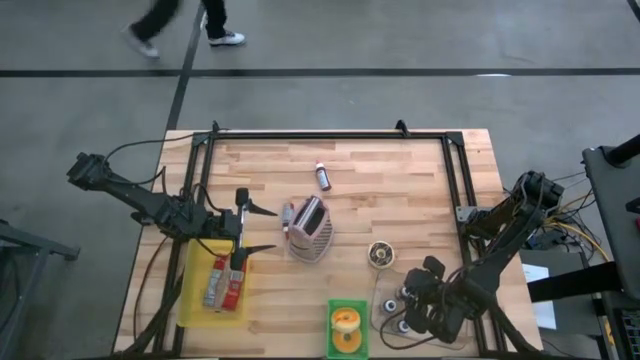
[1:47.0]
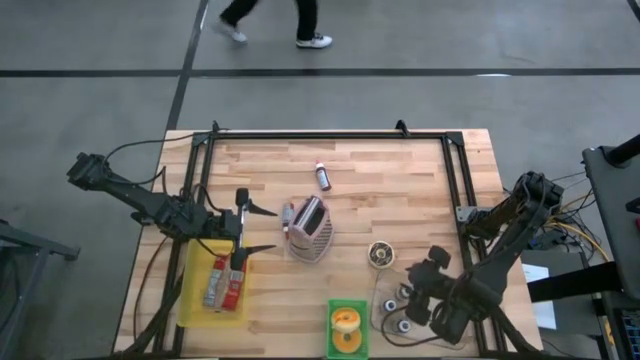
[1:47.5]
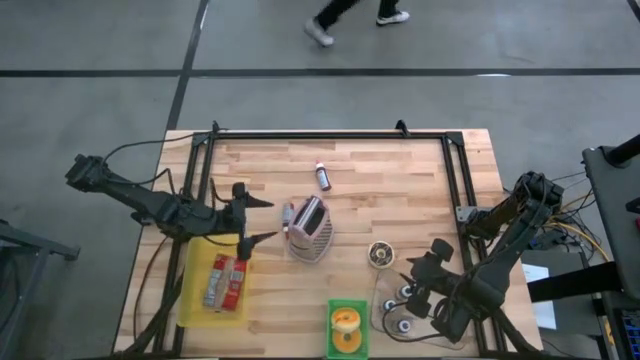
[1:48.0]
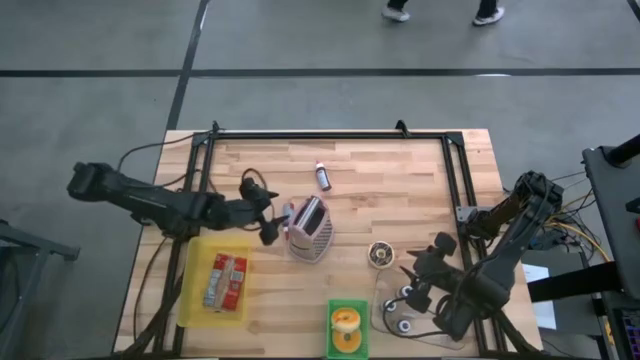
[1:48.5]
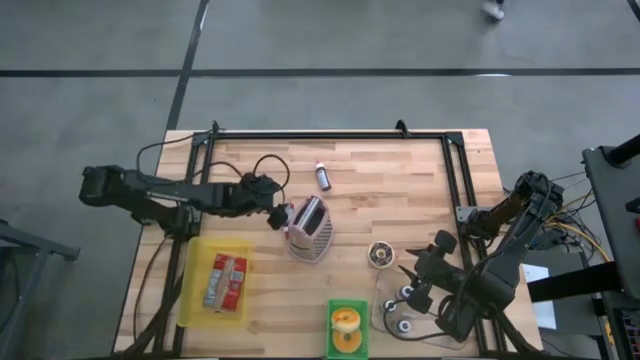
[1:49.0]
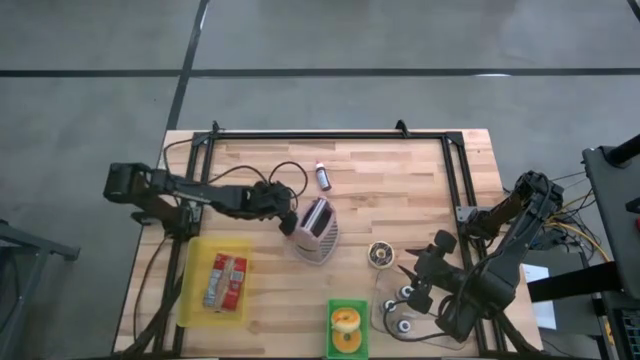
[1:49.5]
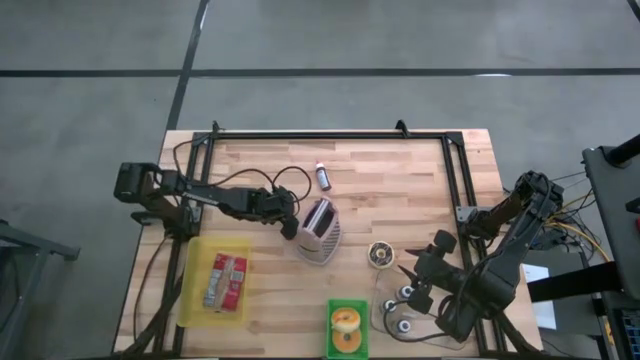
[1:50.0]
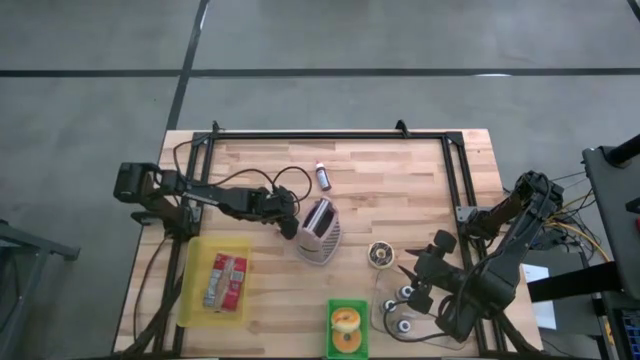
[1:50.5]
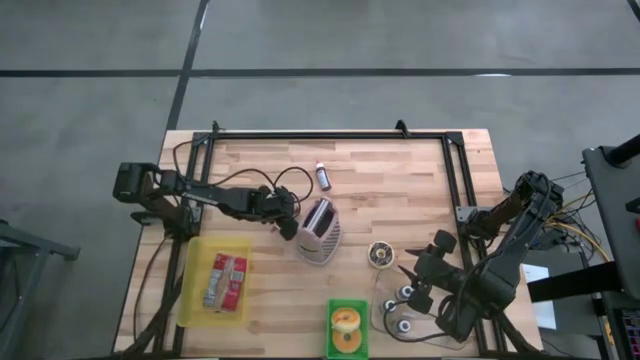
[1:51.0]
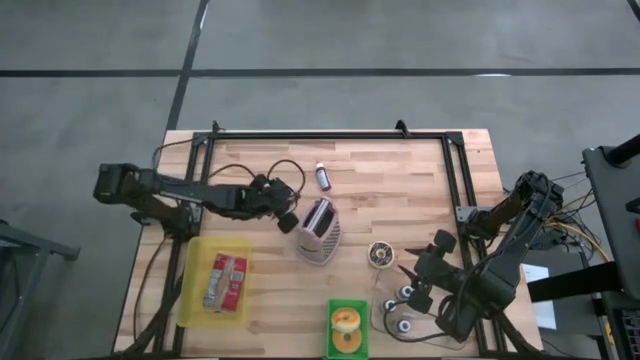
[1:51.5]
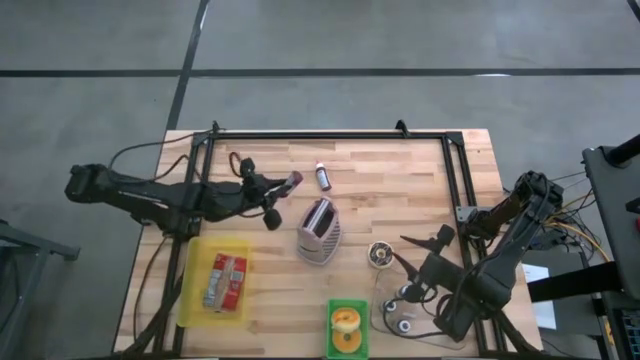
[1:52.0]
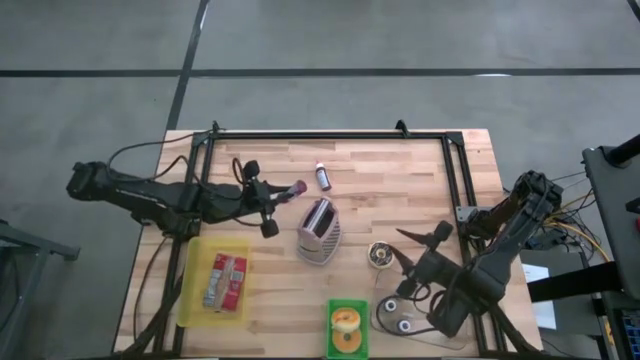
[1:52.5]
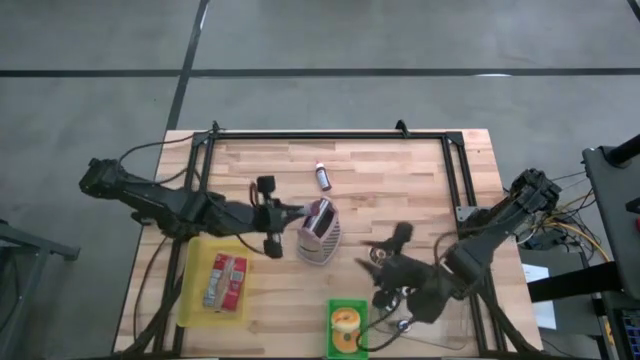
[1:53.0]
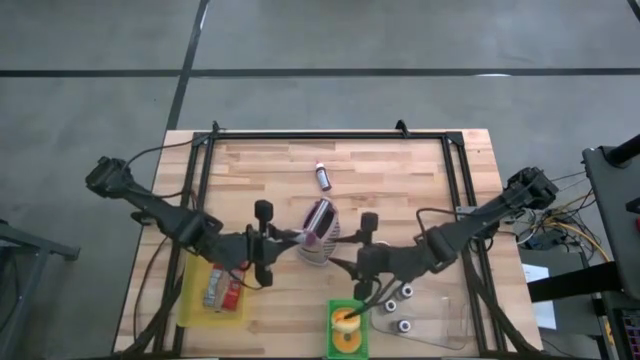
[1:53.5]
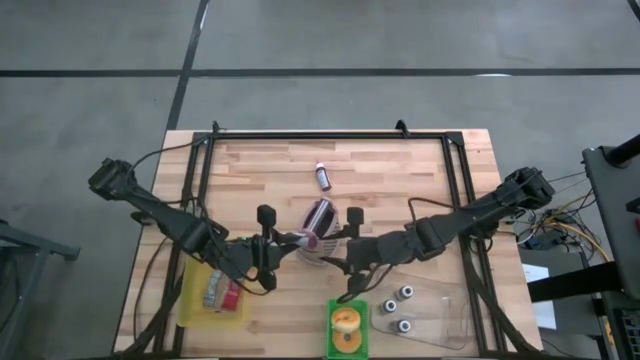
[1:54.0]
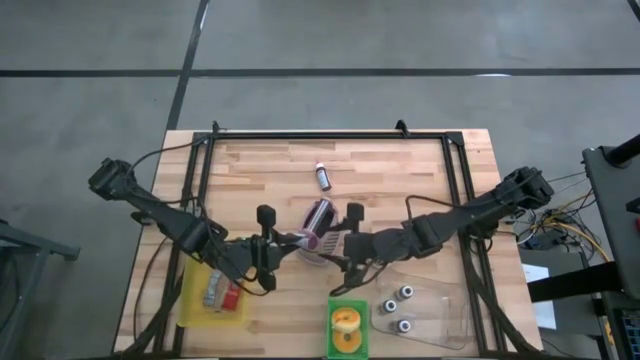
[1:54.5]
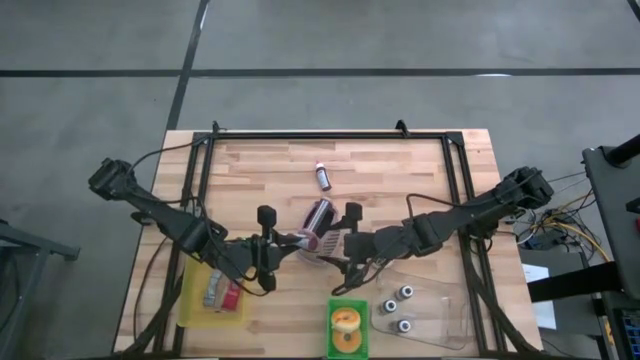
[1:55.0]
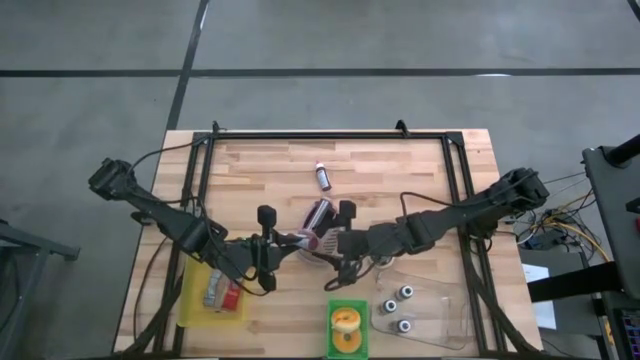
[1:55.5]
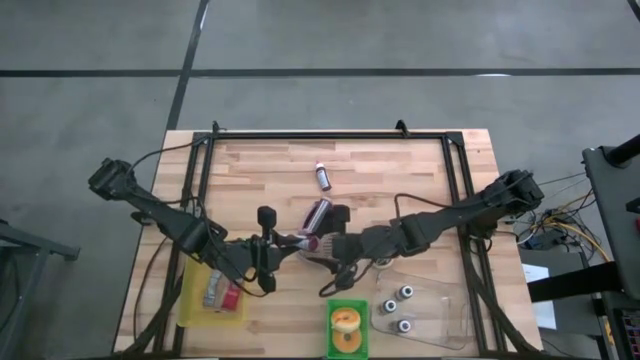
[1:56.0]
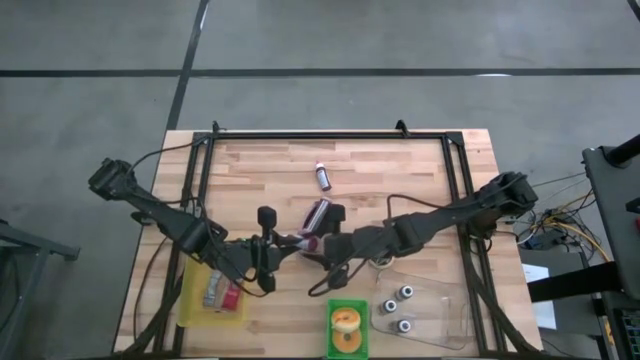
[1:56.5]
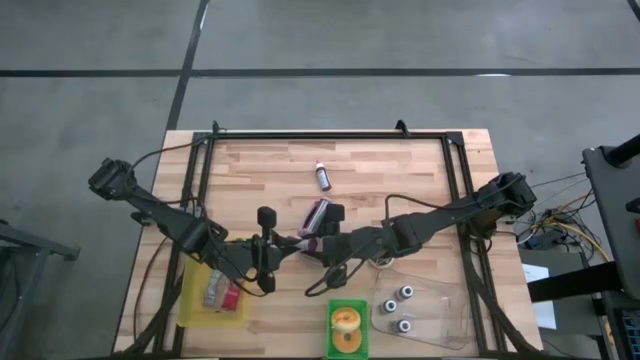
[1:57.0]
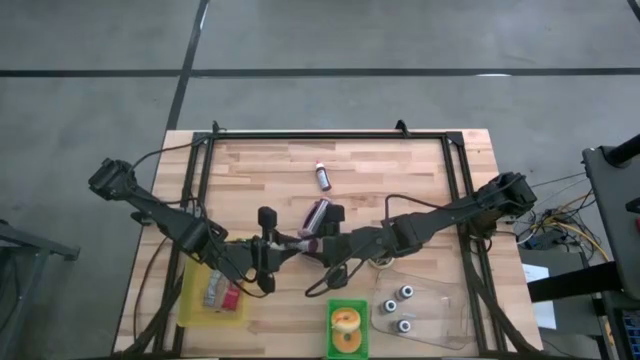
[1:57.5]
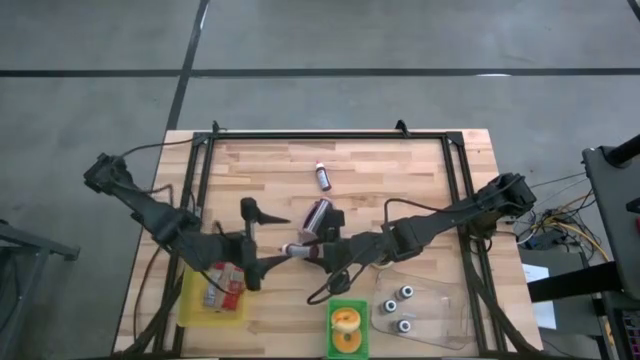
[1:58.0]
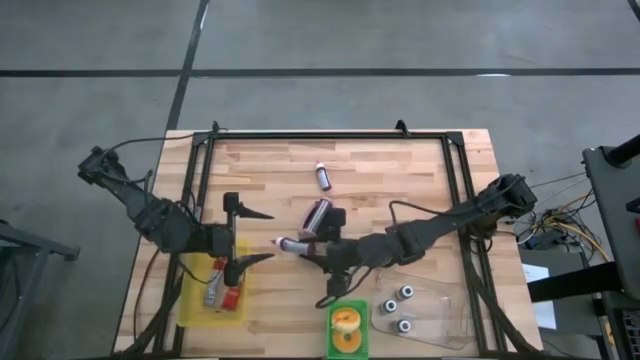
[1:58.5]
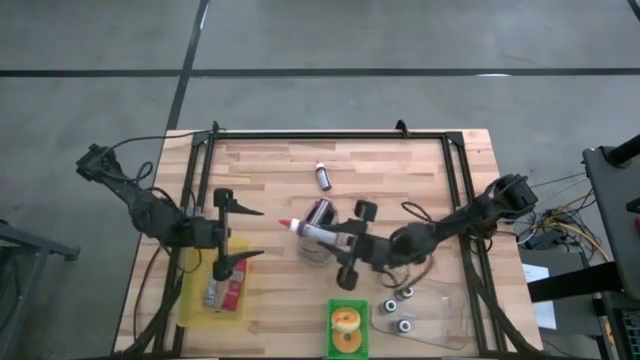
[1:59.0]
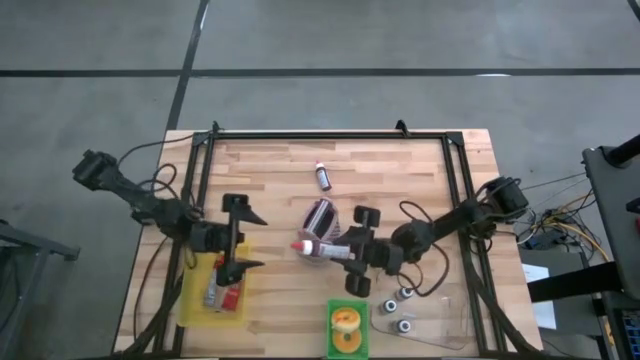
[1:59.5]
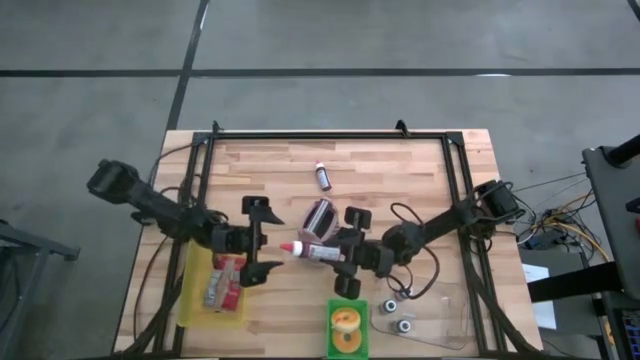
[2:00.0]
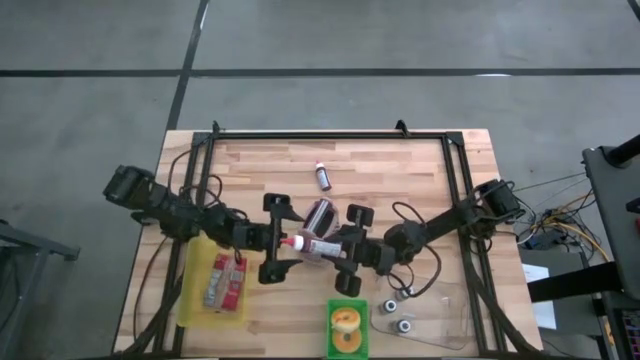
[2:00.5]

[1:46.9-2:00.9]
Task: Pick & Place Food Item
Put the red food coloring bottle into the transparent bin

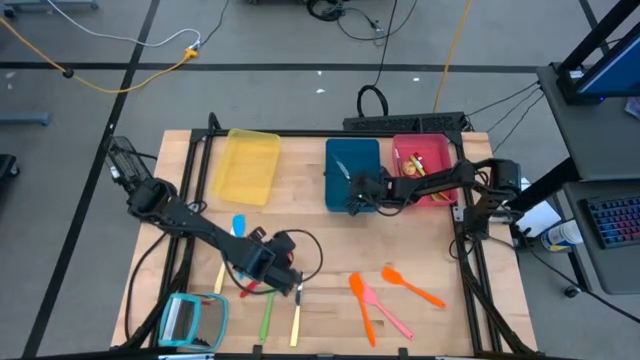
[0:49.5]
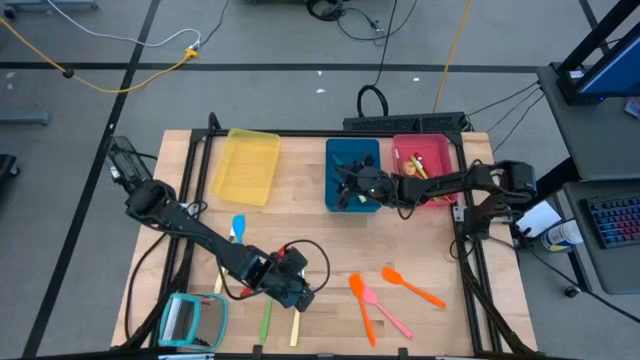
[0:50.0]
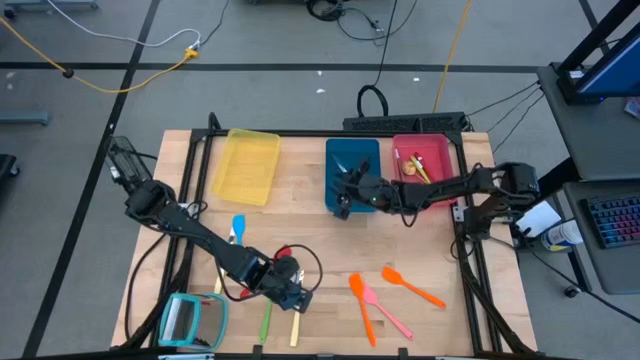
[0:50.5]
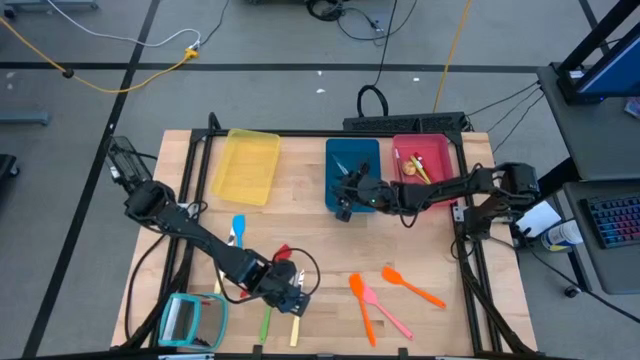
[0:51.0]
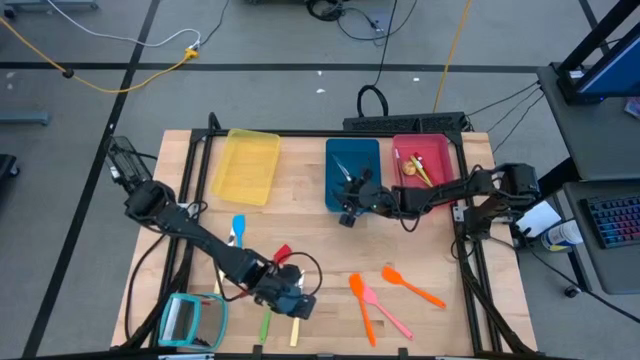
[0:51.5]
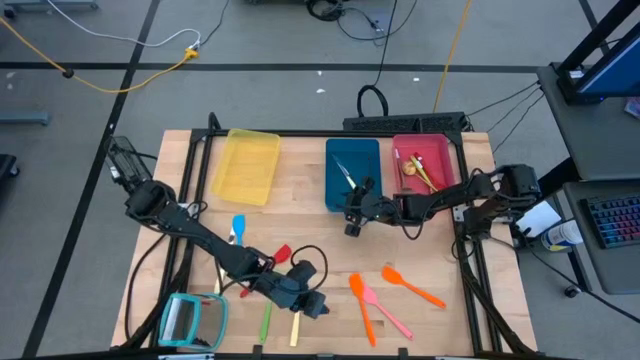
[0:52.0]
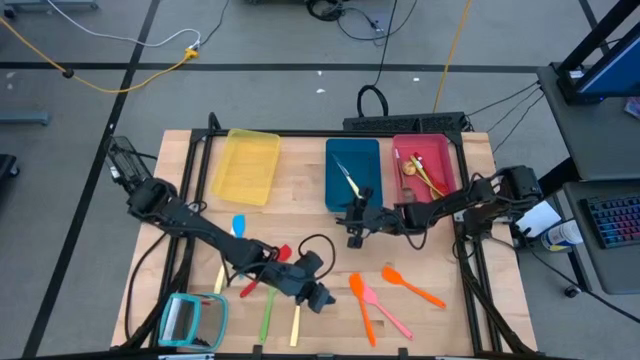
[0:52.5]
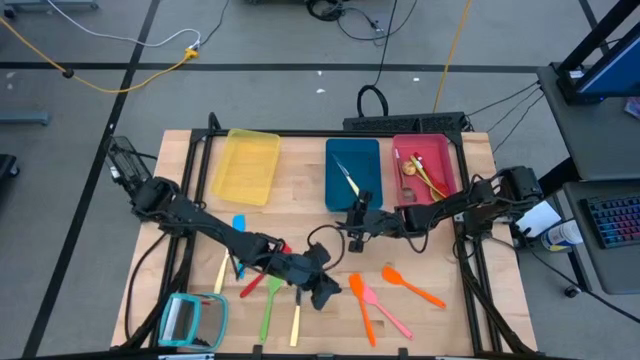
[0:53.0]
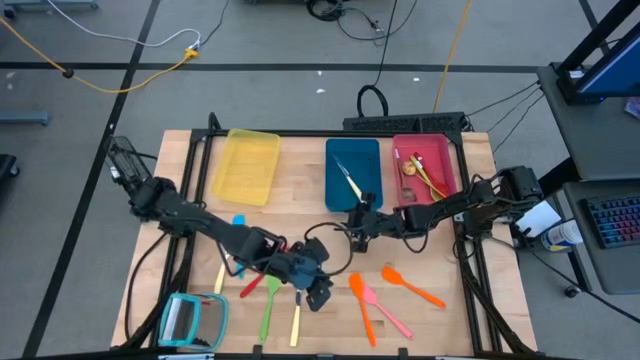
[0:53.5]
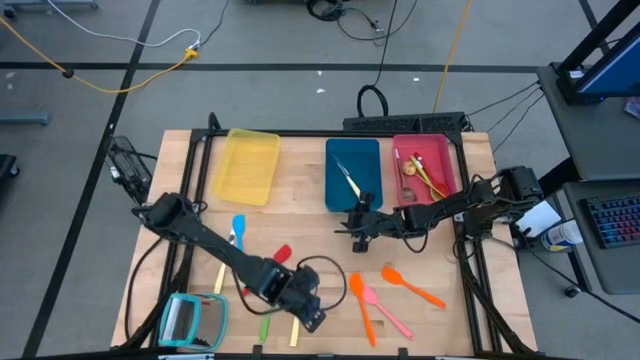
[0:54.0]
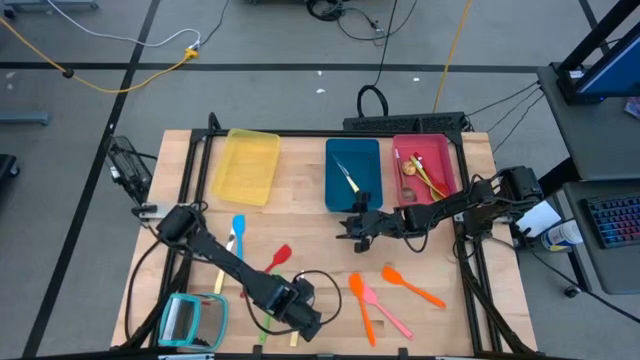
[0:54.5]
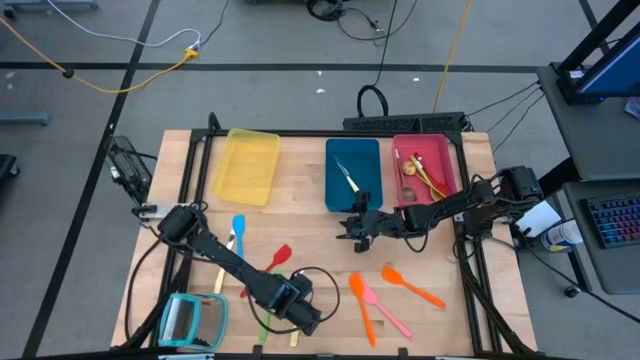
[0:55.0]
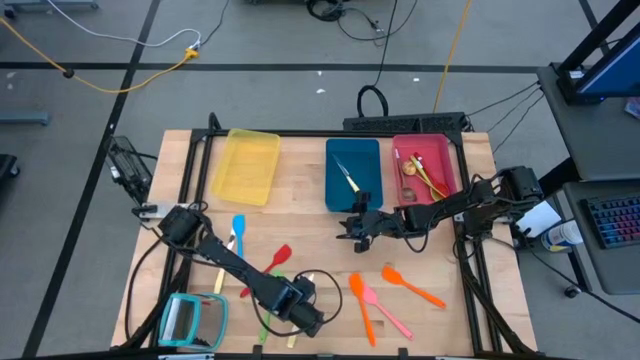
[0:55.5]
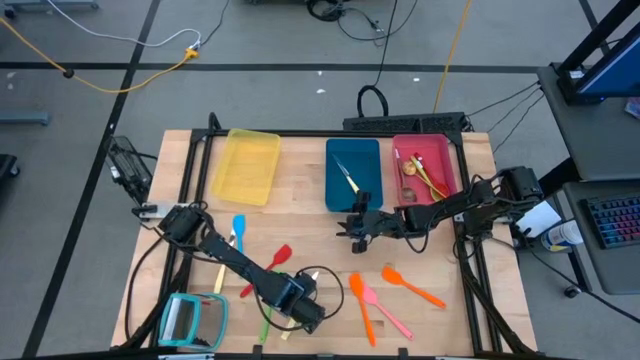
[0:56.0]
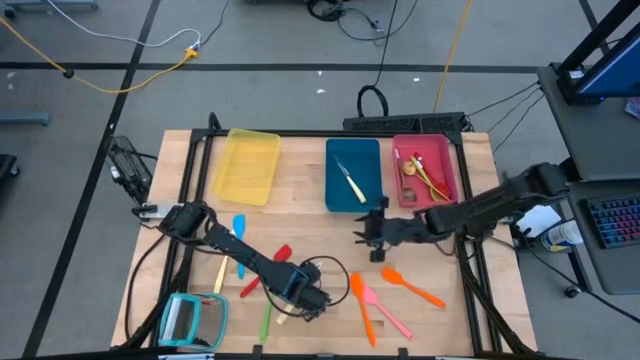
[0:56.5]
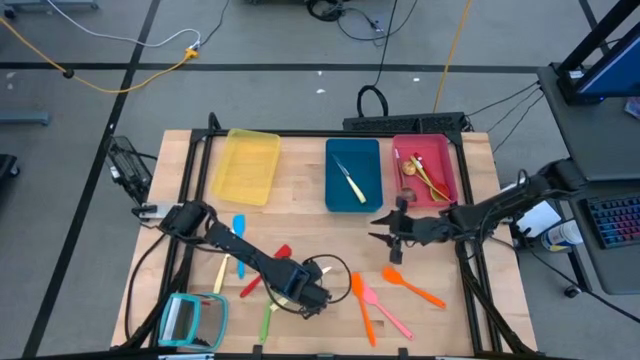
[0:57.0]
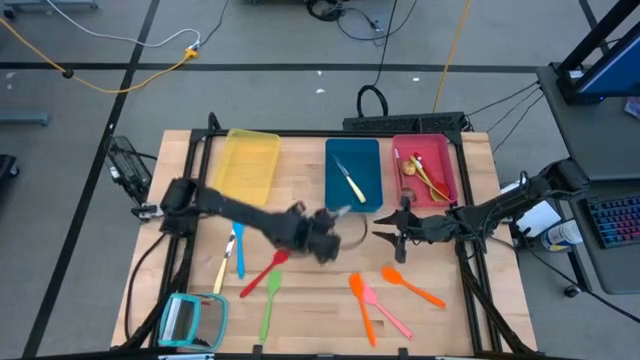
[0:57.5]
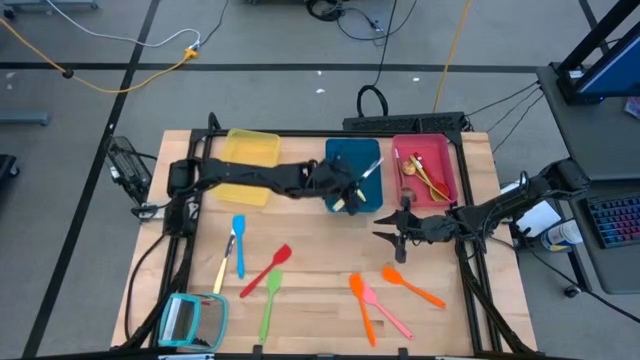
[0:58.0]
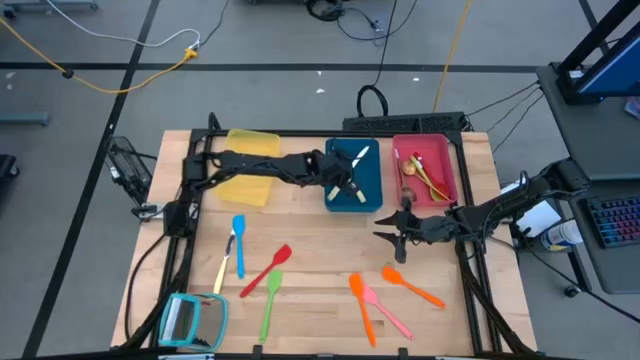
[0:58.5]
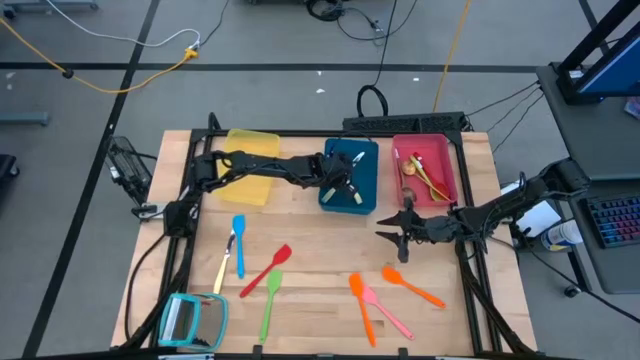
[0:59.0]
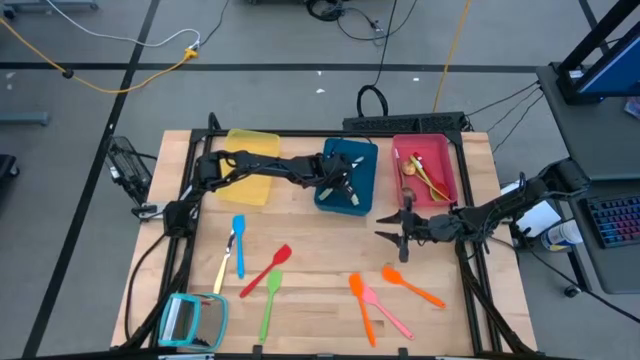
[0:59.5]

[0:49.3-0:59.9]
Task: Pick & Place Kitchen Items
Put the bottom yellow table knife into the blue bin
